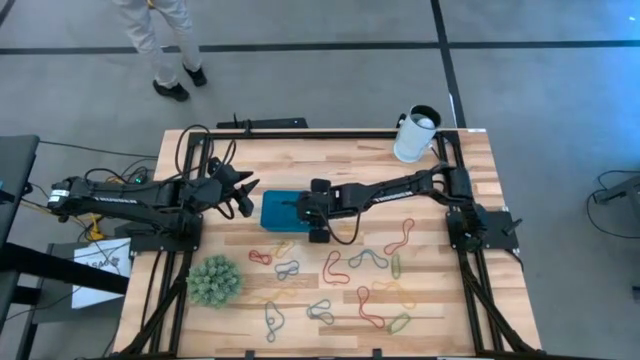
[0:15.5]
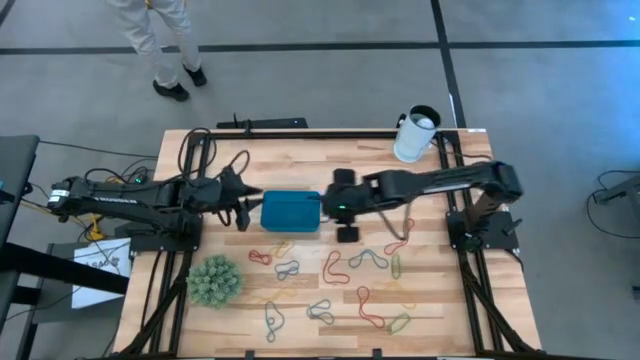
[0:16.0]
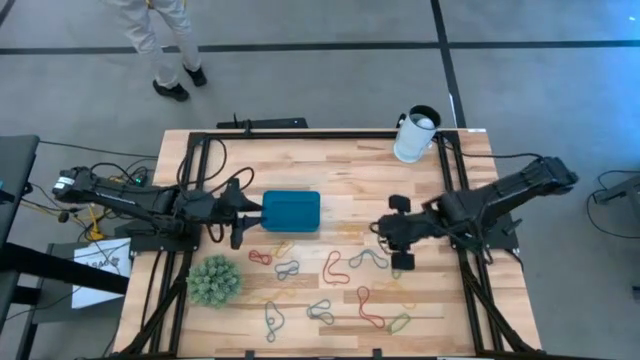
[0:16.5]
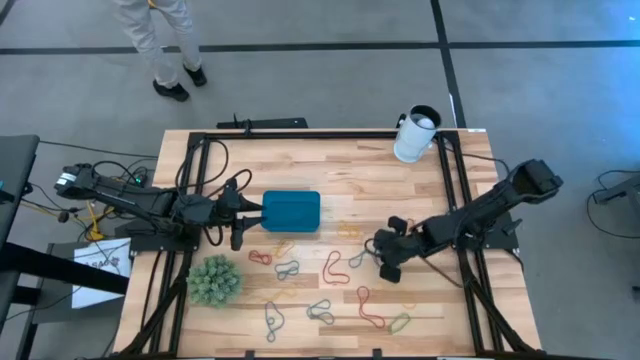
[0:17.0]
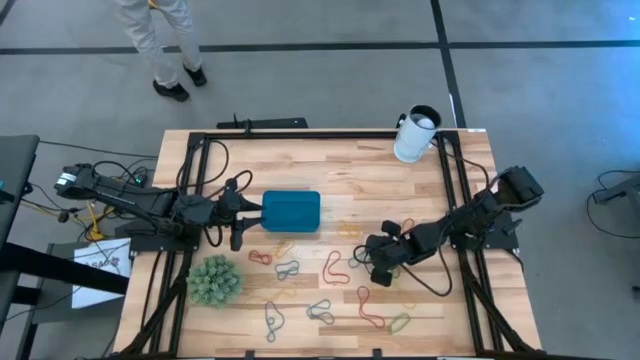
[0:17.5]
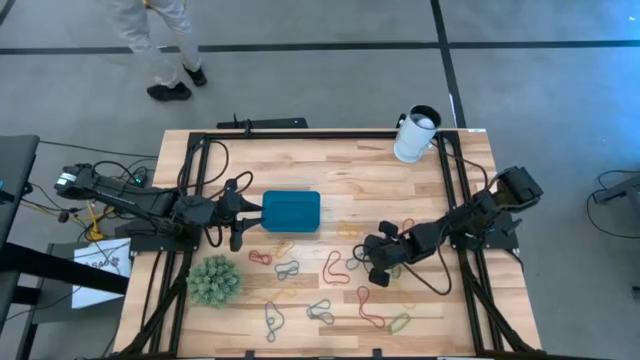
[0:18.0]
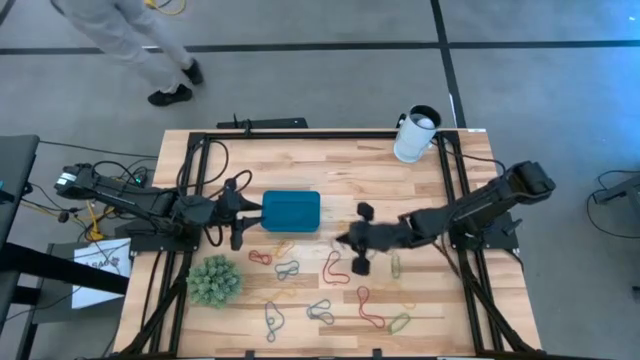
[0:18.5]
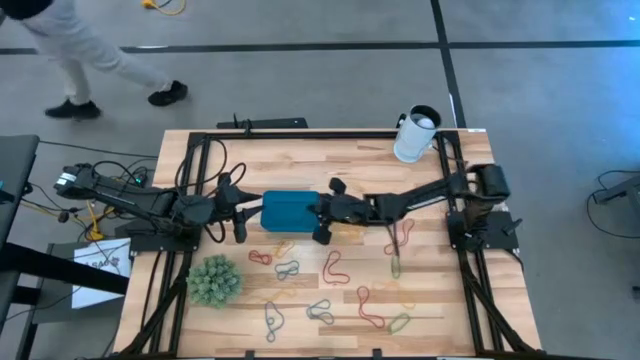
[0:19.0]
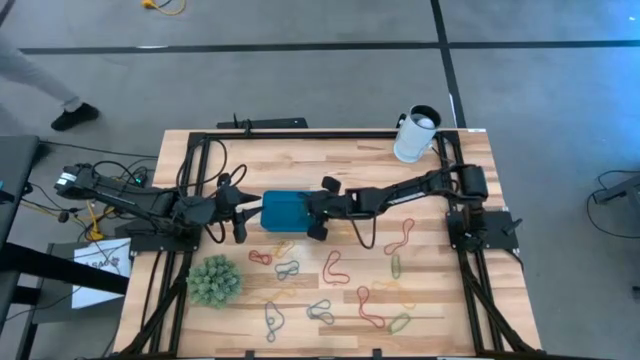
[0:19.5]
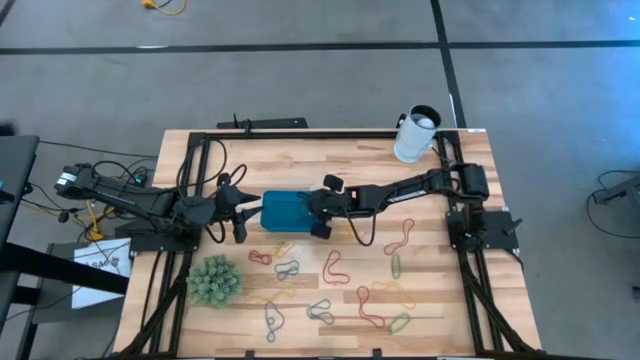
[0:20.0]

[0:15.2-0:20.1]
Task: Pick and place items into bin
Put the blue rubber band into the blue bin

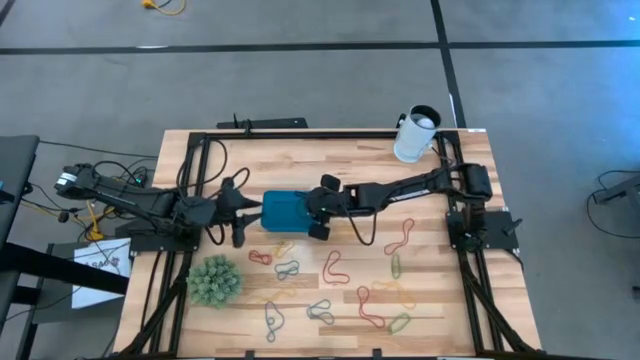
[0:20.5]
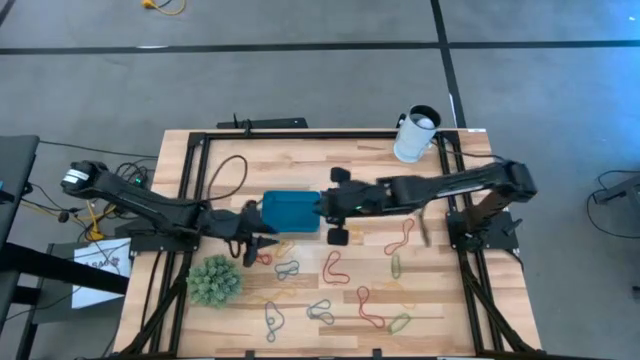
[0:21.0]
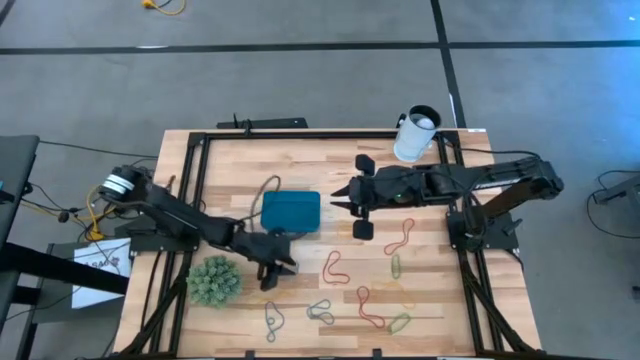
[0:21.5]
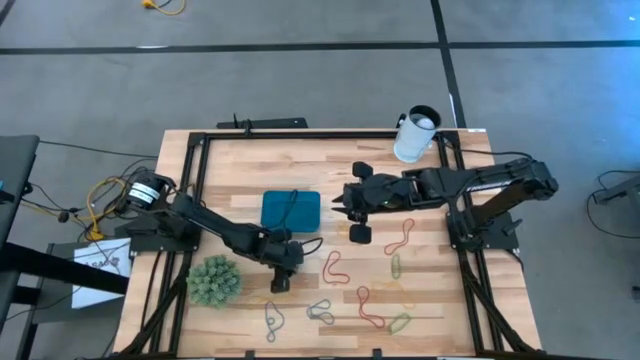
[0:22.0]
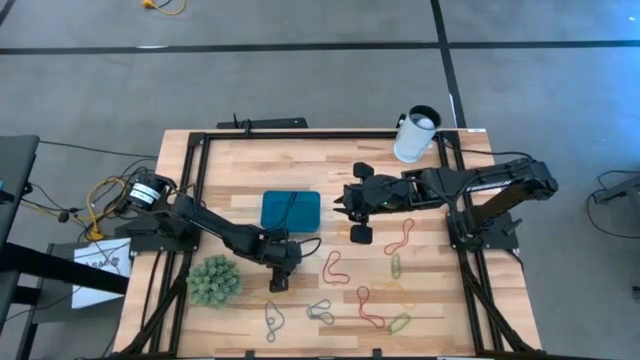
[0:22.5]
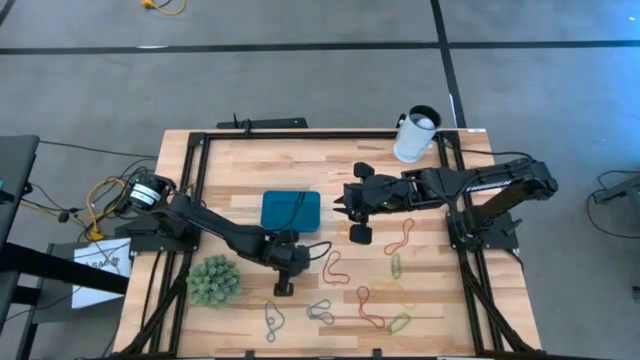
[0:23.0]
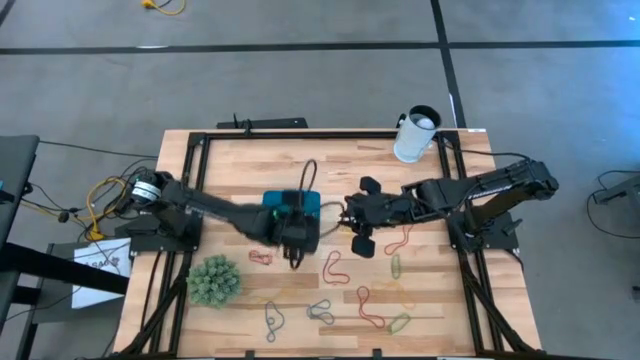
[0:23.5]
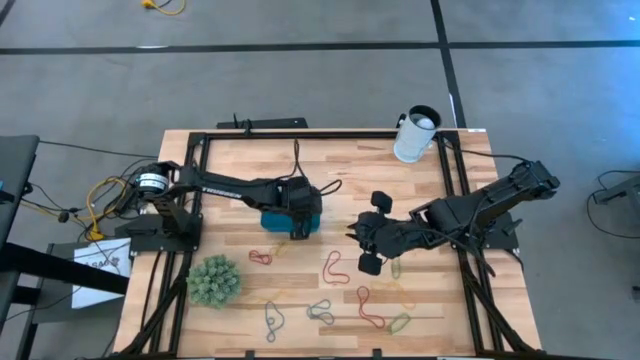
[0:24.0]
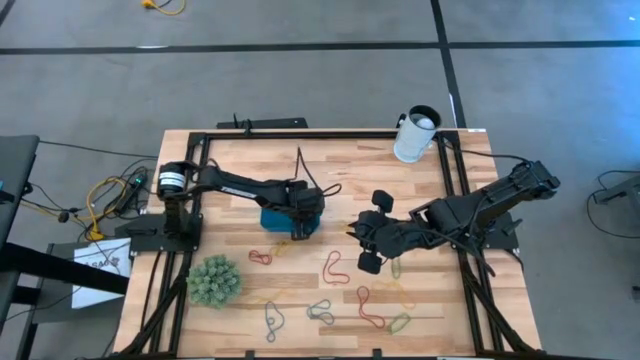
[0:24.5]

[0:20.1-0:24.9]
Put the blue rubber band into the blue bin

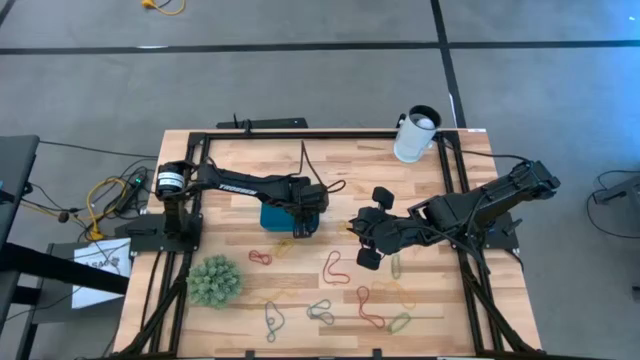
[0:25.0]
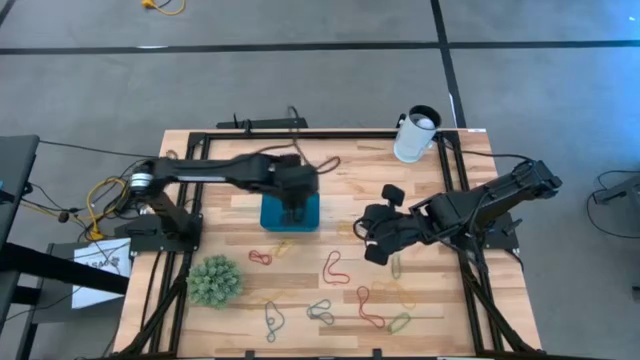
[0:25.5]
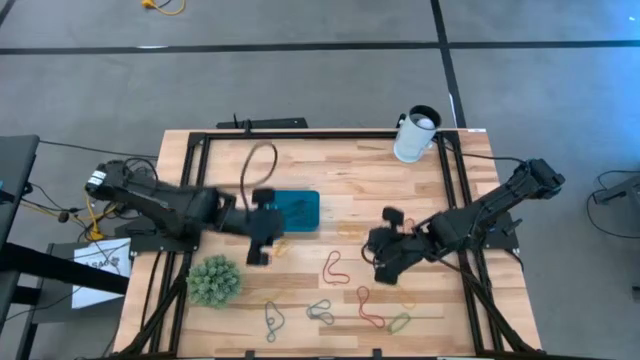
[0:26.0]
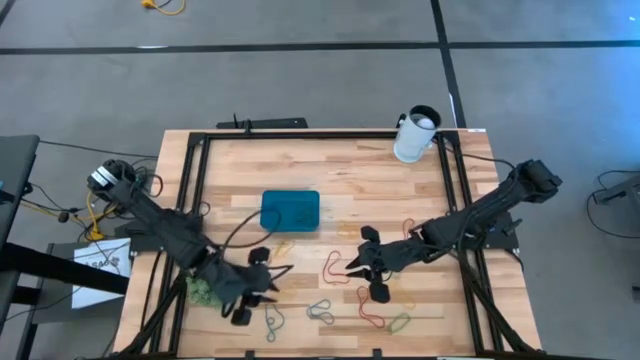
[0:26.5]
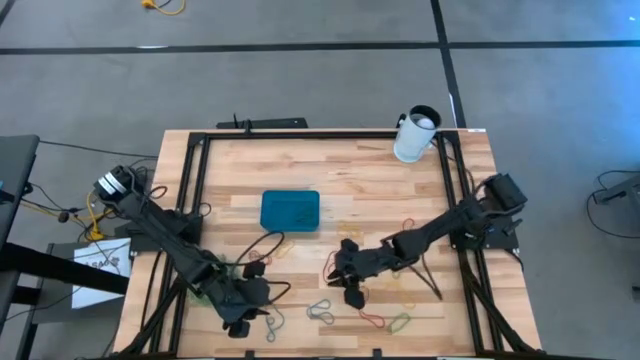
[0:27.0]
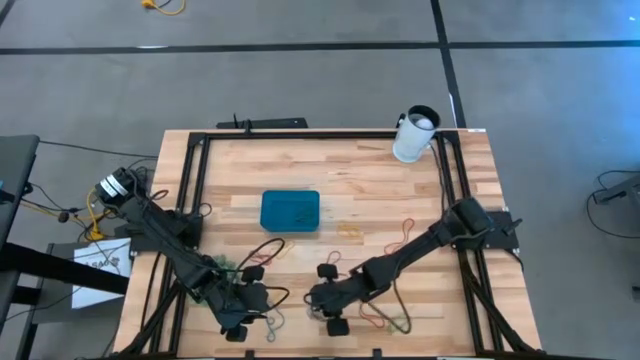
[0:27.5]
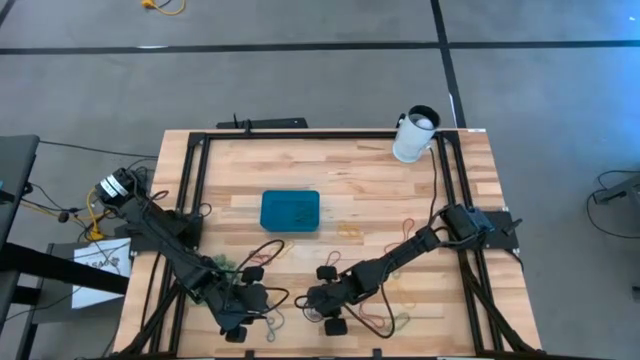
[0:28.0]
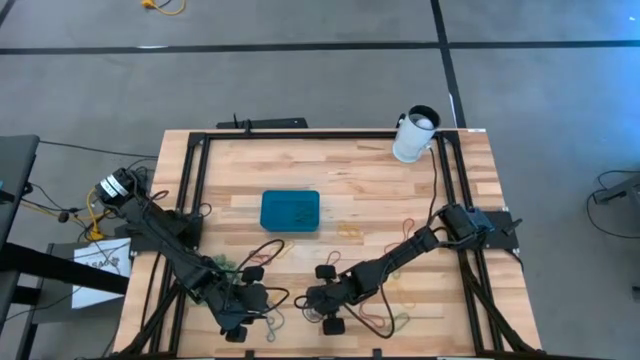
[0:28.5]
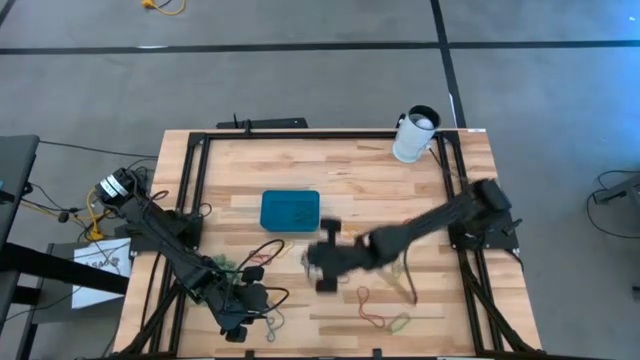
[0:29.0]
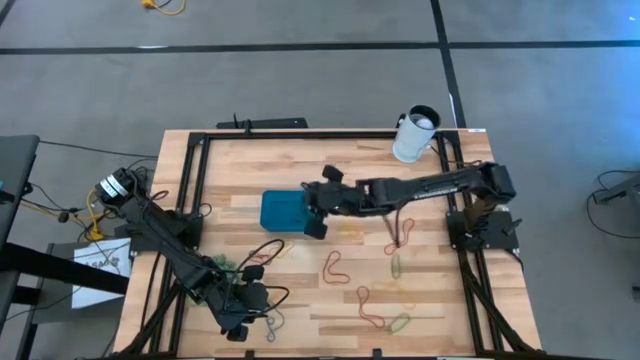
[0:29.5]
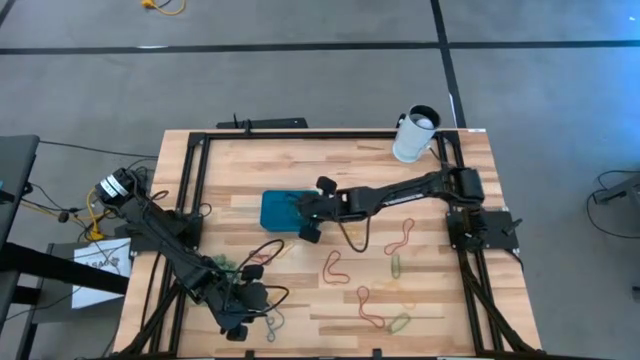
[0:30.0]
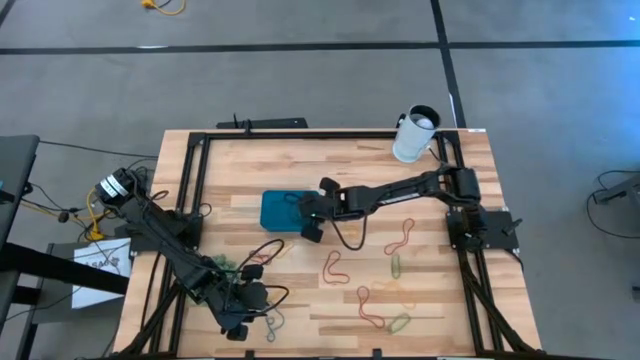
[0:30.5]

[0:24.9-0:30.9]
Put the blue rubber band into the blue bin

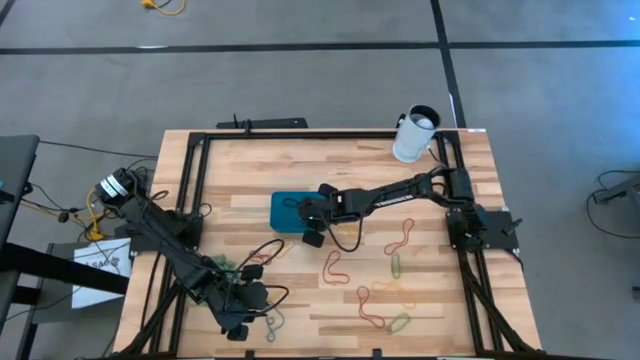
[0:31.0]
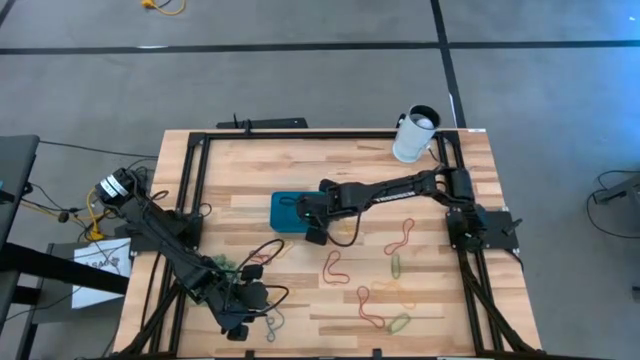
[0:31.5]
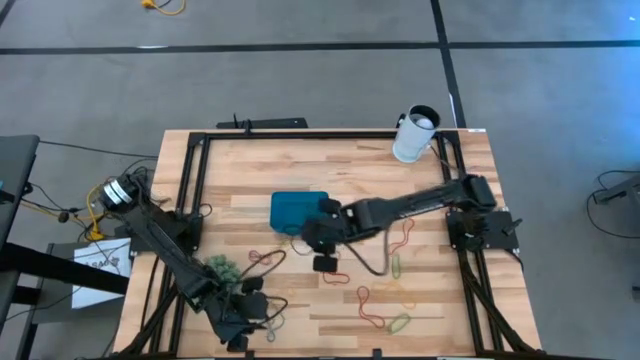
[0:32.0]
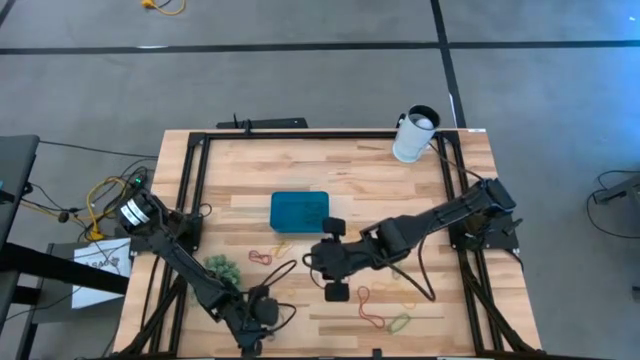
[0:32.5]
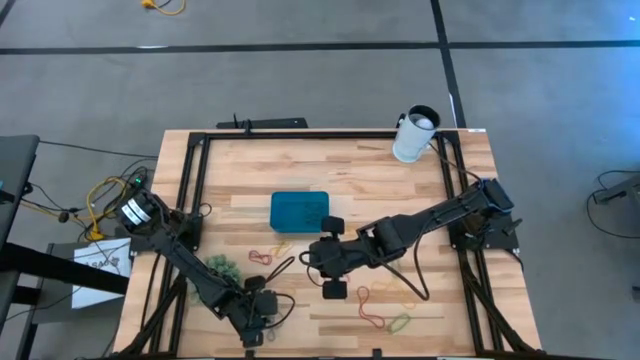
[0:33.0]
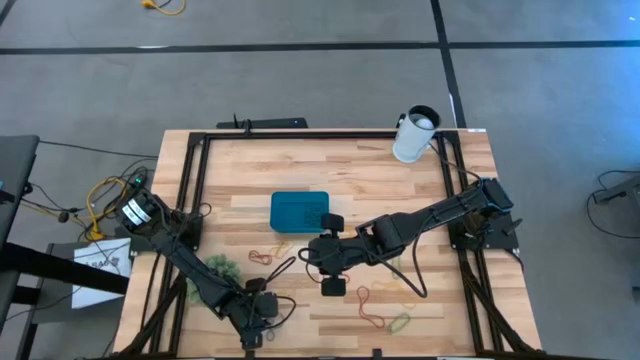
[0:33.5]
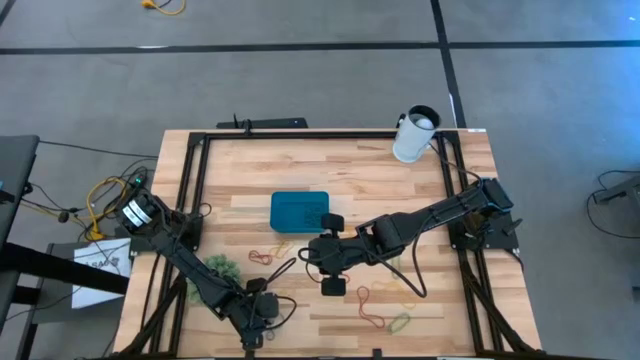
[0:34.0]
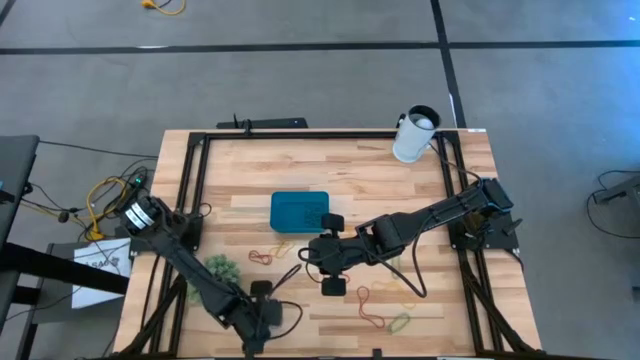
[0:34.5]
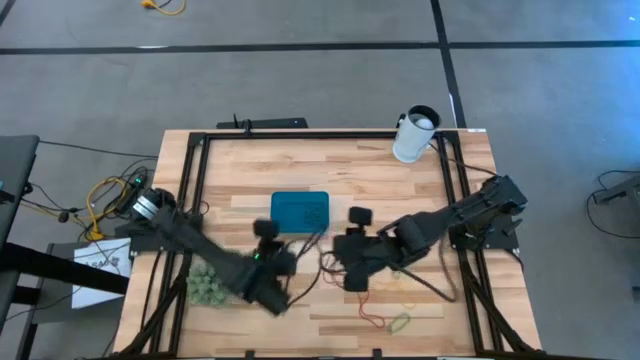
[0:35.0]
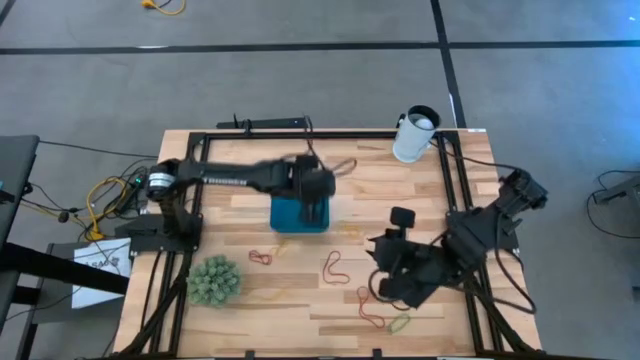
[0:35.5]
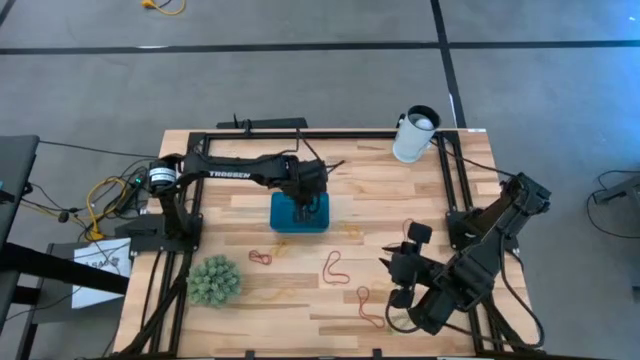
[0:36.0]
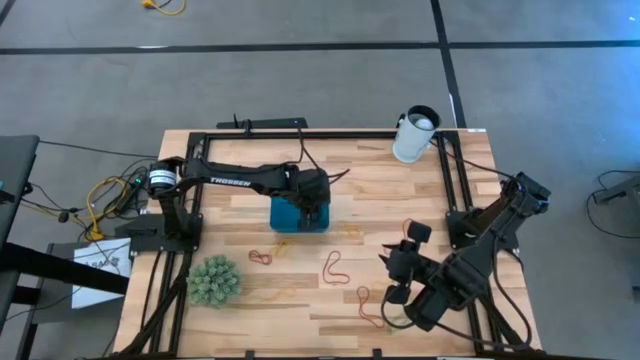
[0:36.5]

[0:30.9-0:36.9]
Put the blue rubber band into the blue bin
